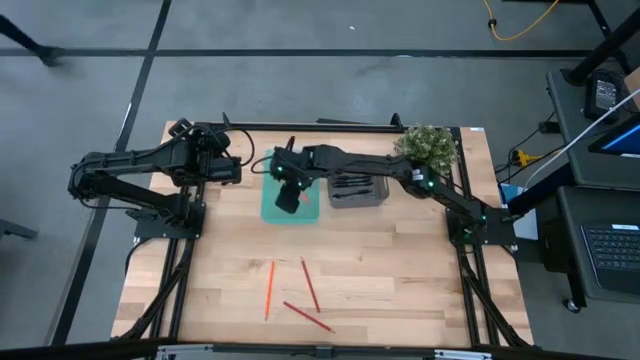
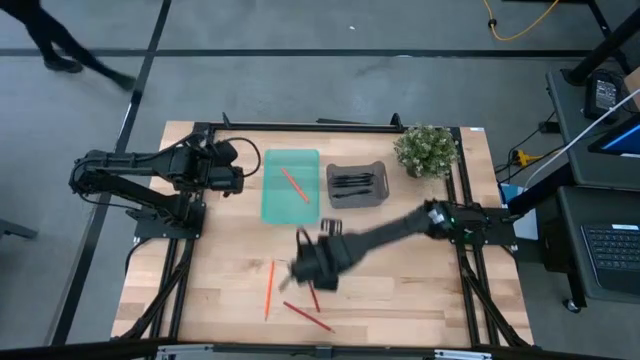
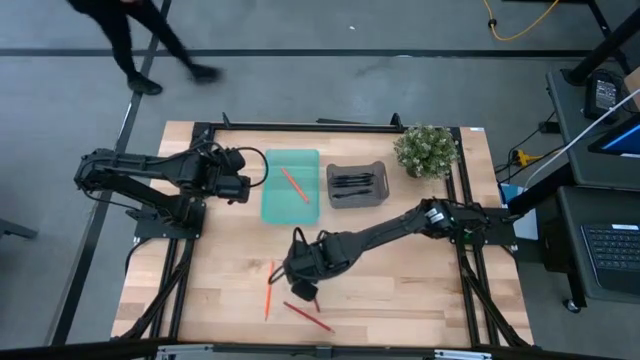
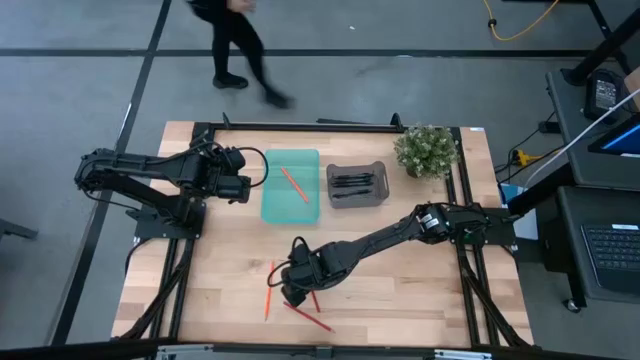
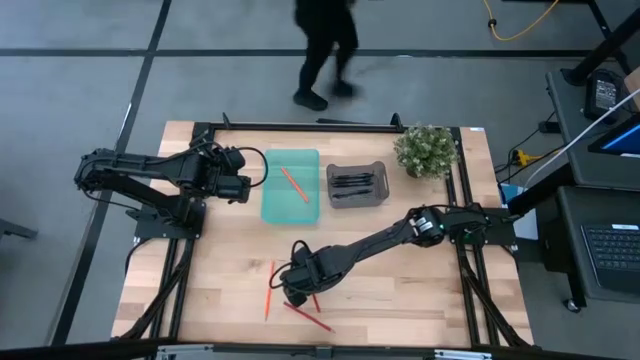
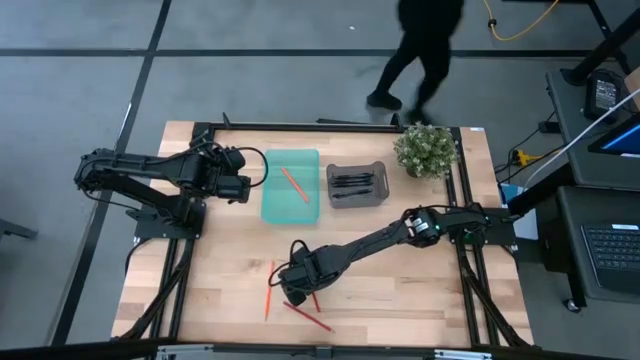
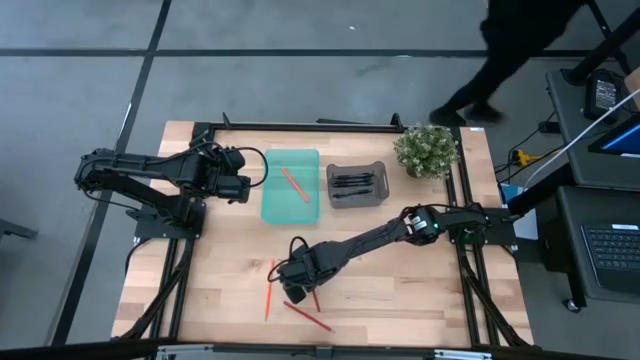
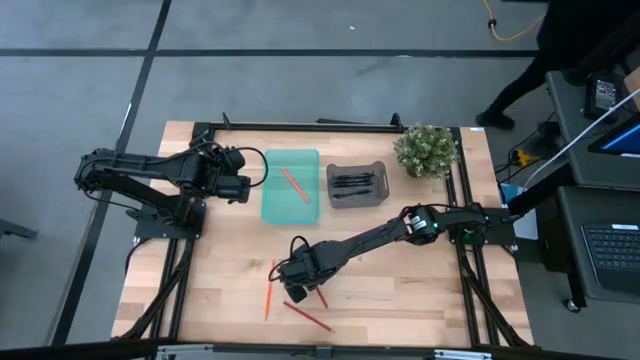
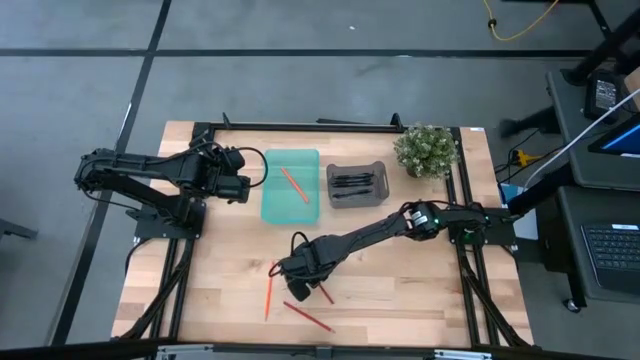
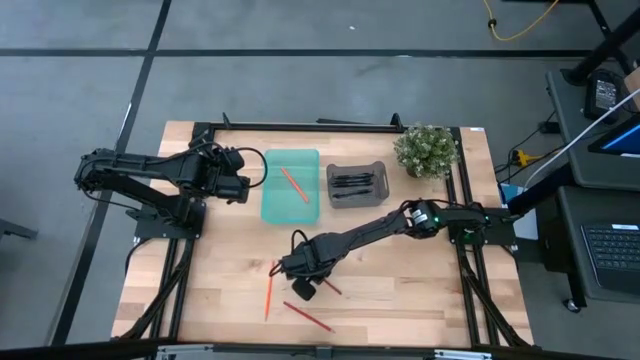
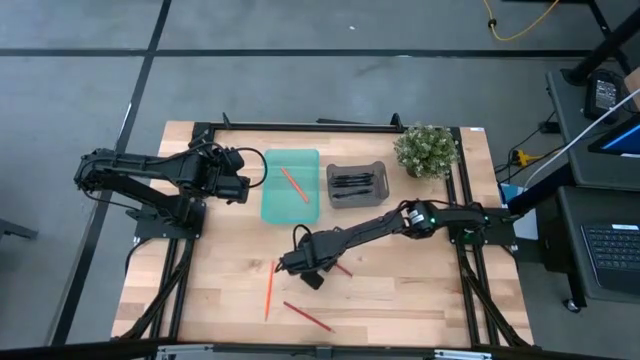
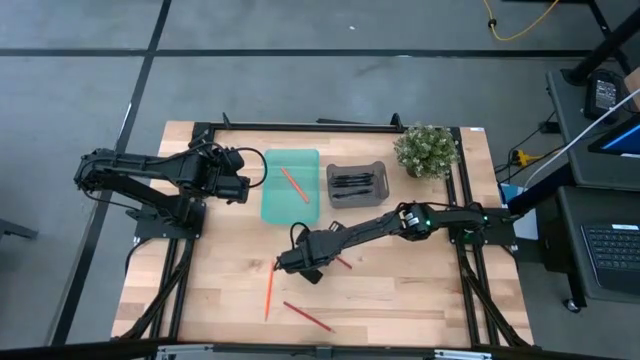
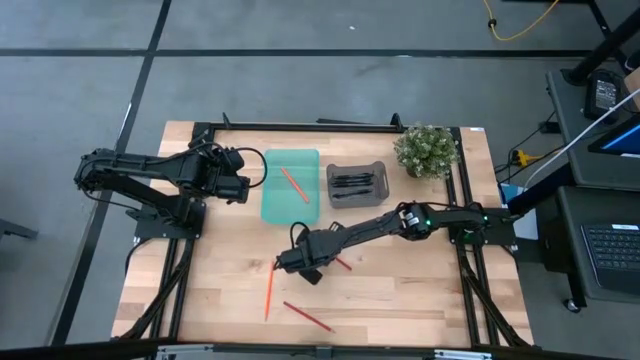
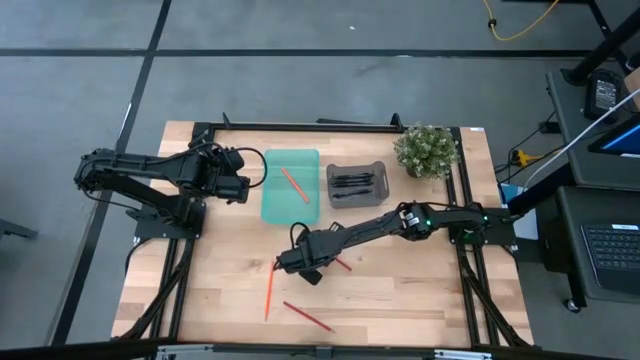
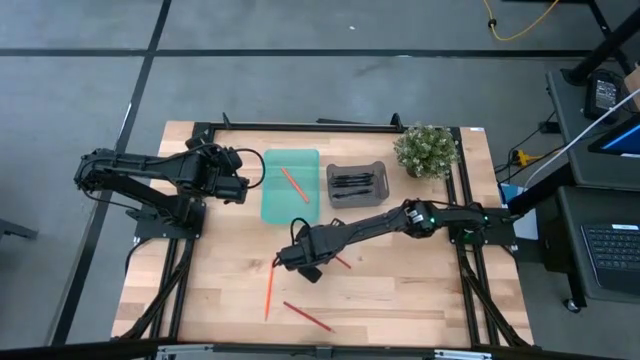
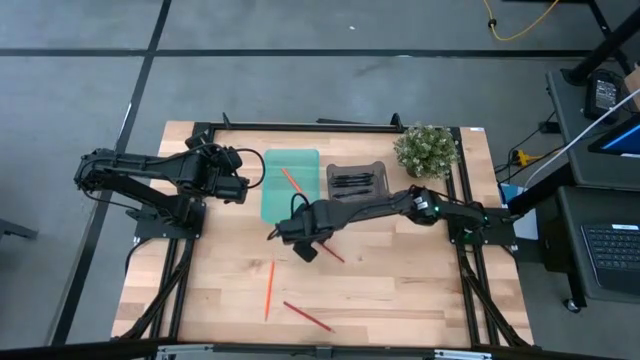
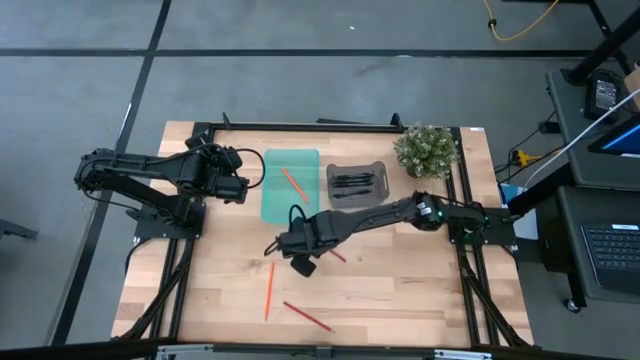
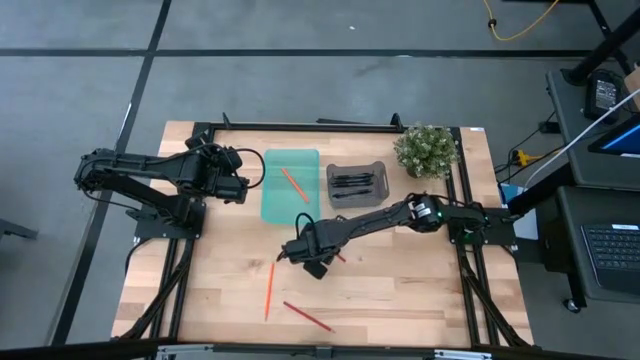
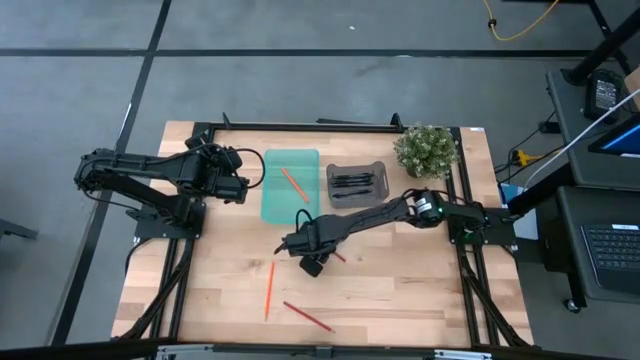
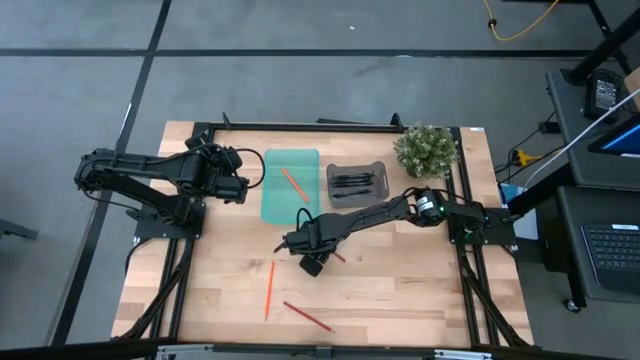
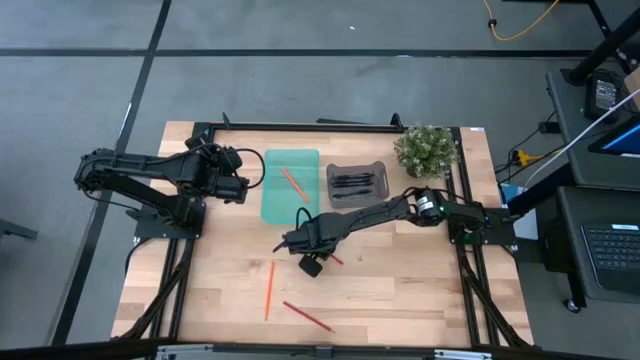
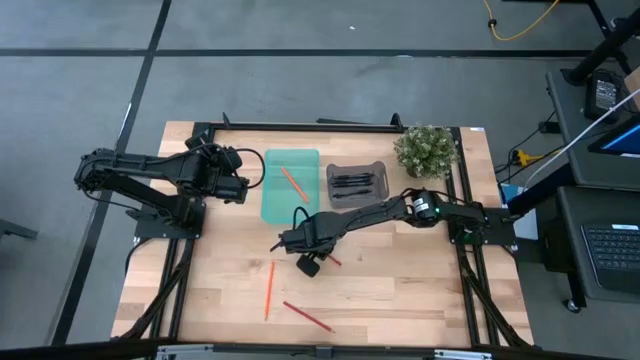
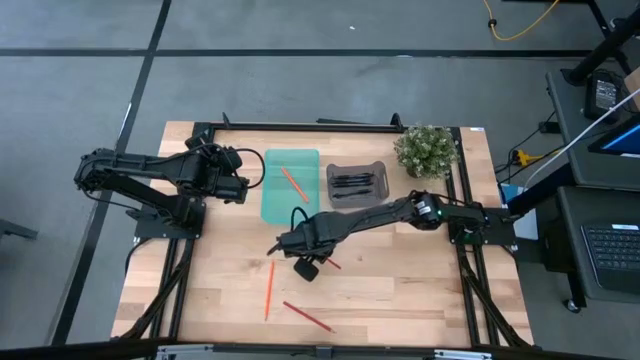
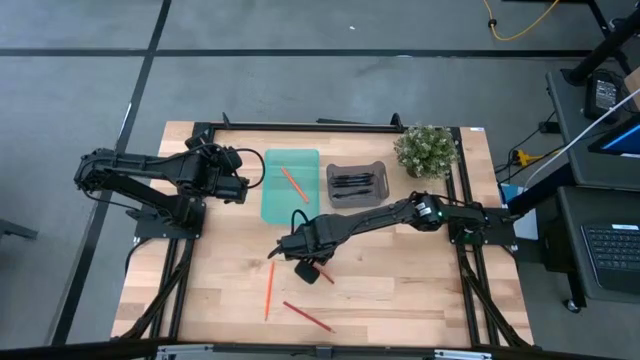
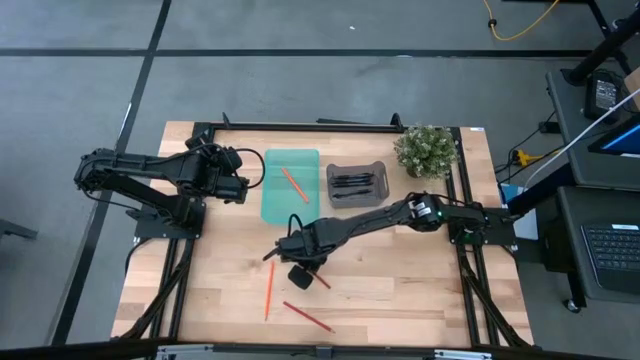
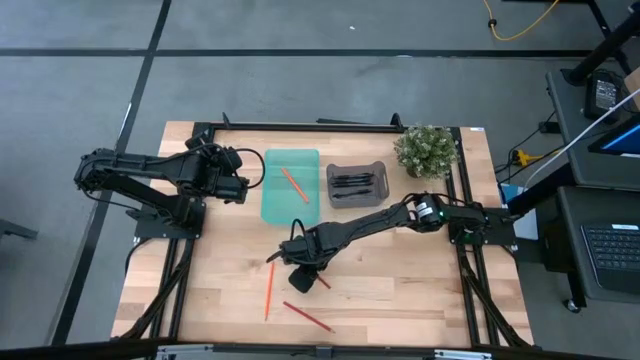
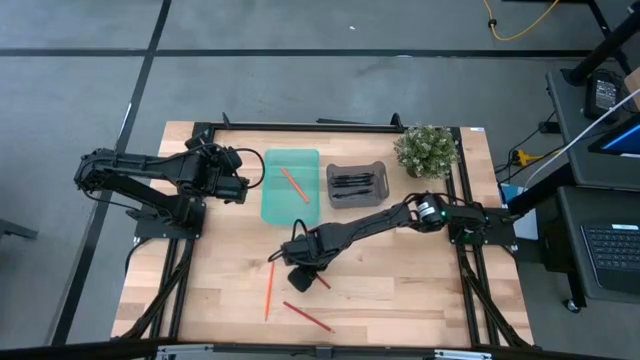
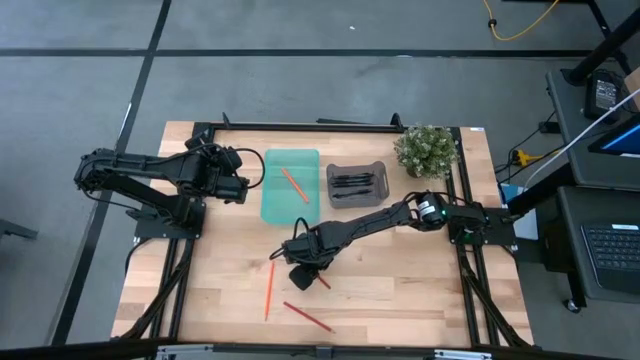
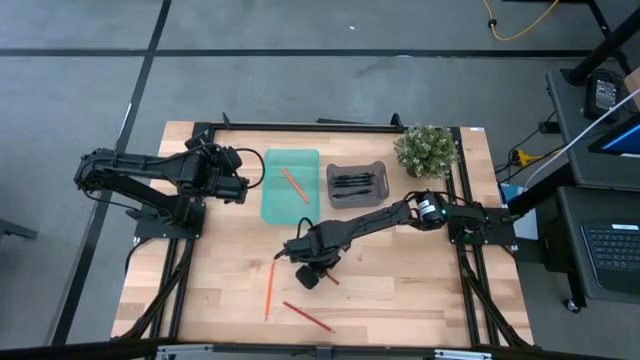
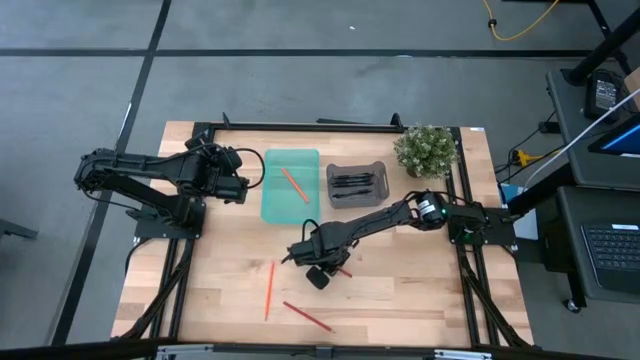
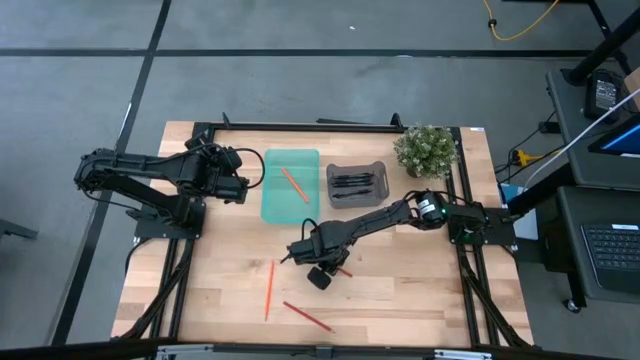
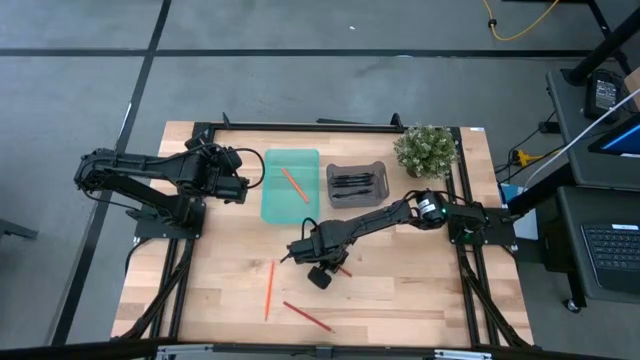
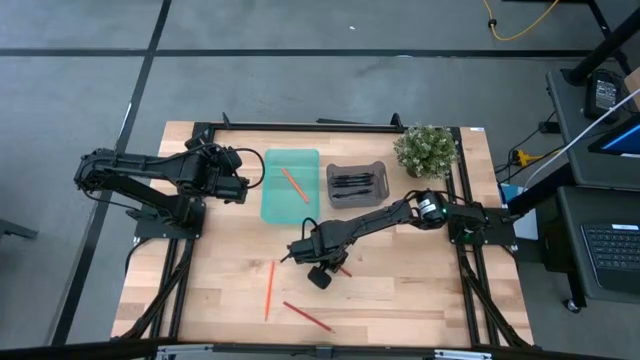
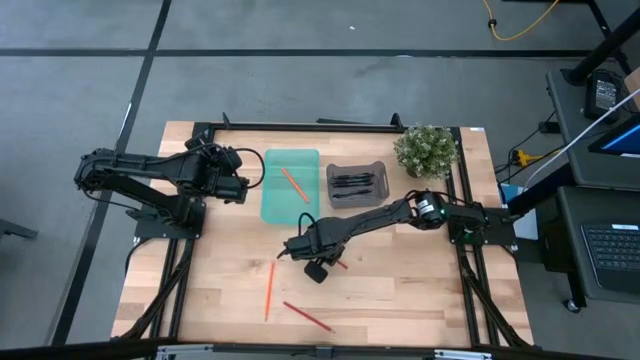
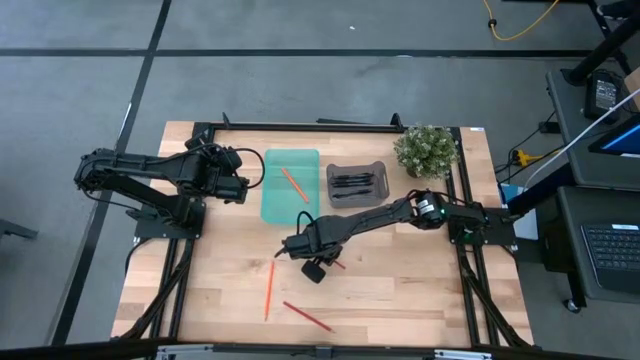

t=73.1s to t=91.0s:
Task: Sort pens & pencils
Put the red pencil into the green bin

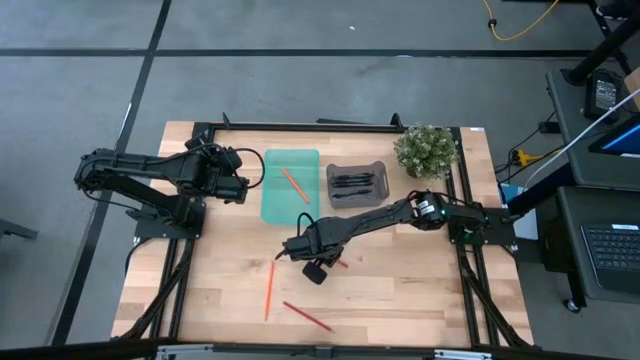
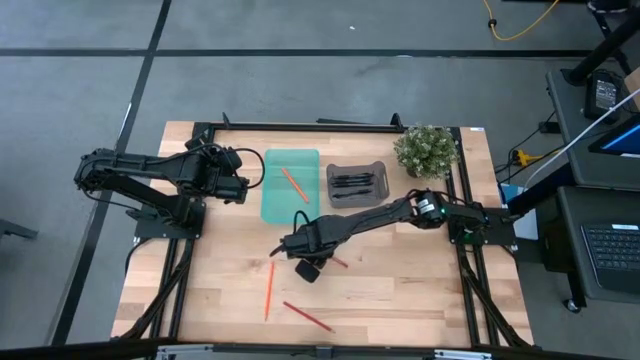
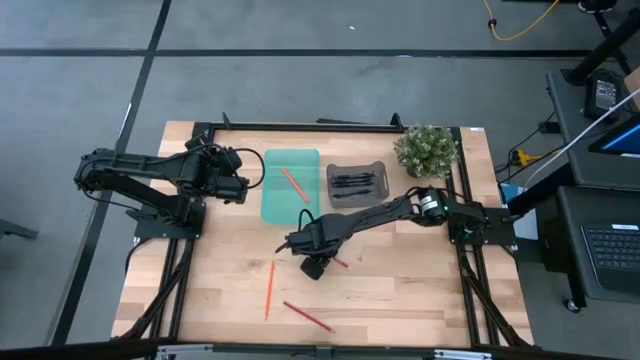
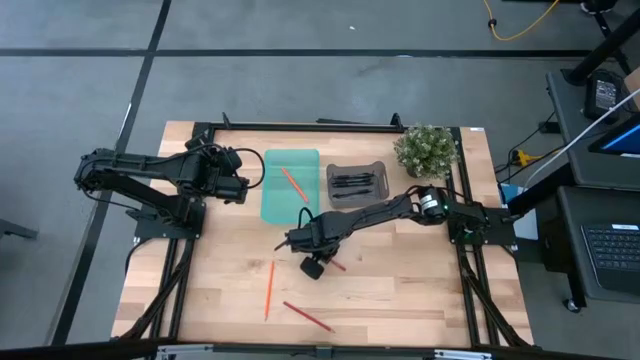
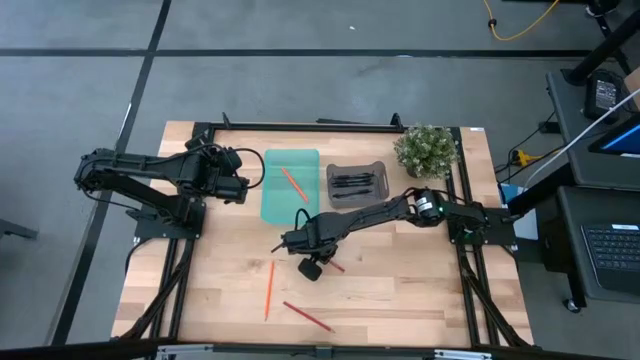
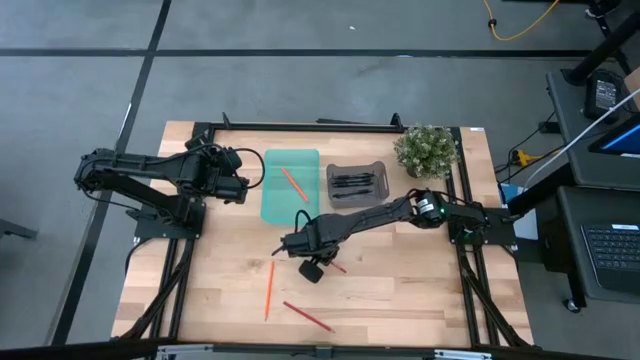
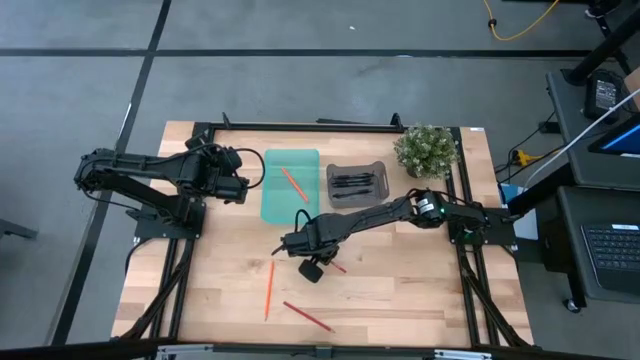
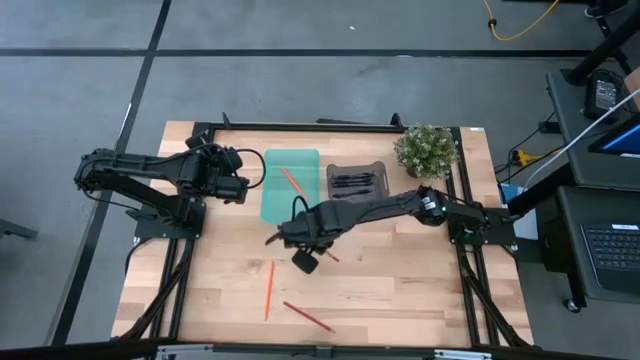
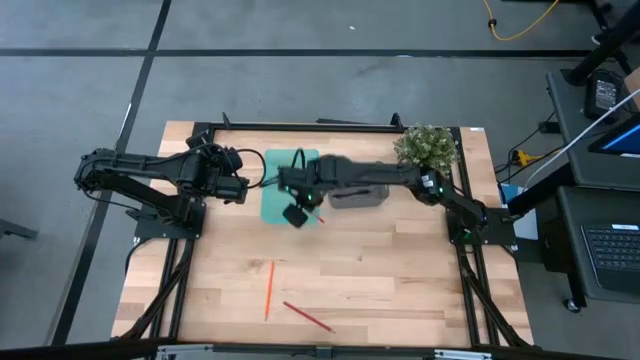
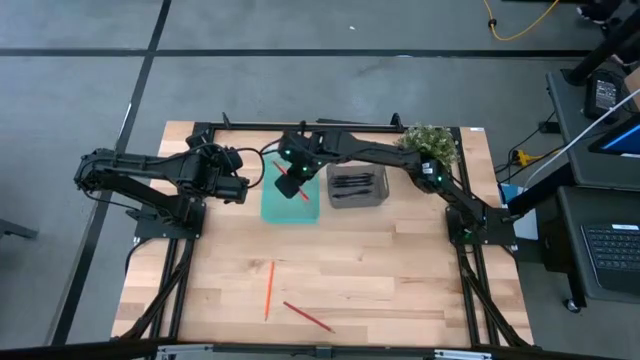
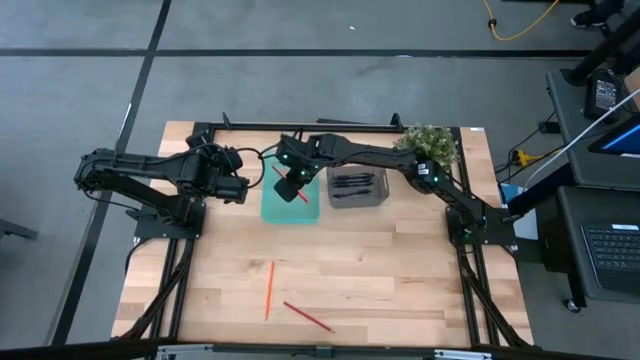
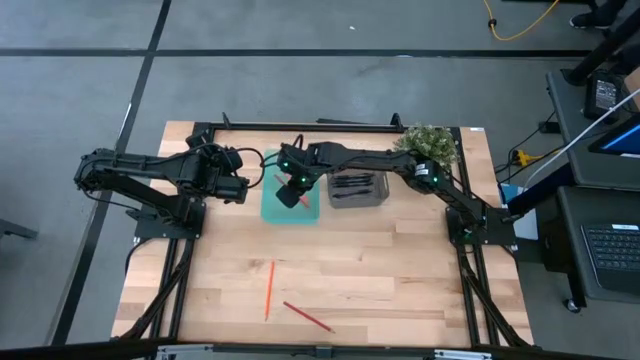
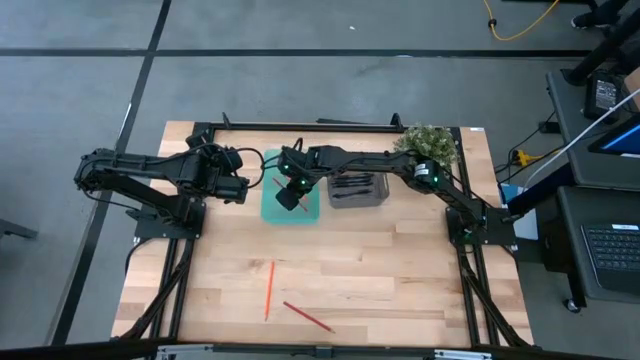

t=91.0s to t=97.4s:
Put the red pencil into the green bin
